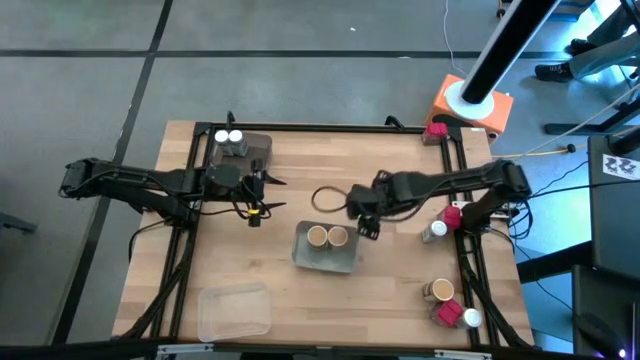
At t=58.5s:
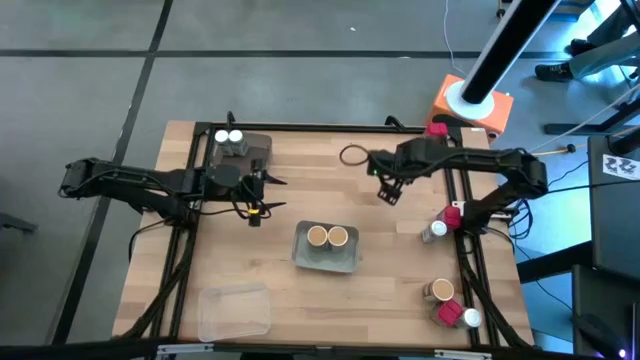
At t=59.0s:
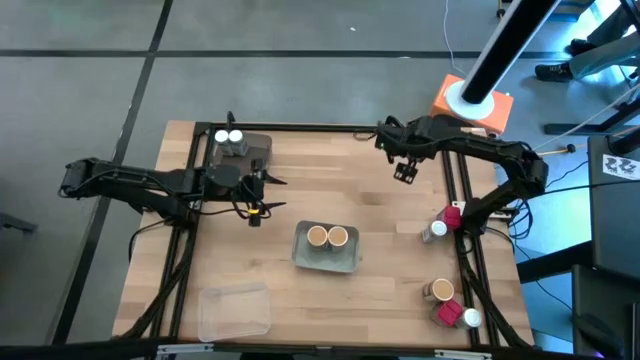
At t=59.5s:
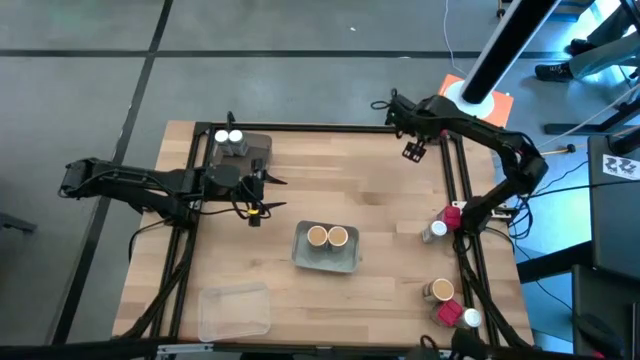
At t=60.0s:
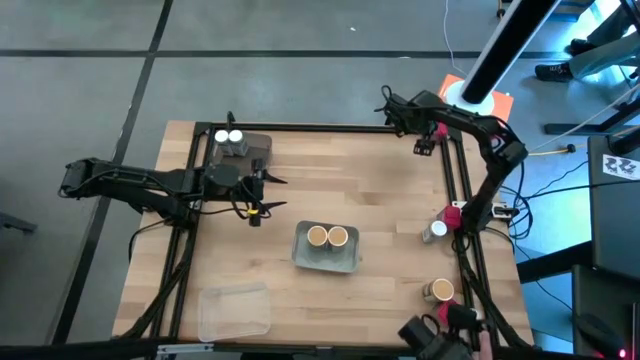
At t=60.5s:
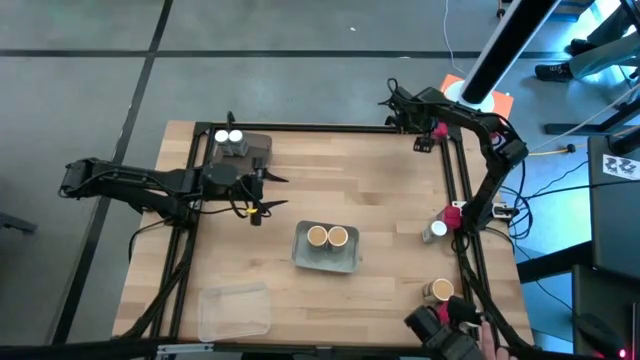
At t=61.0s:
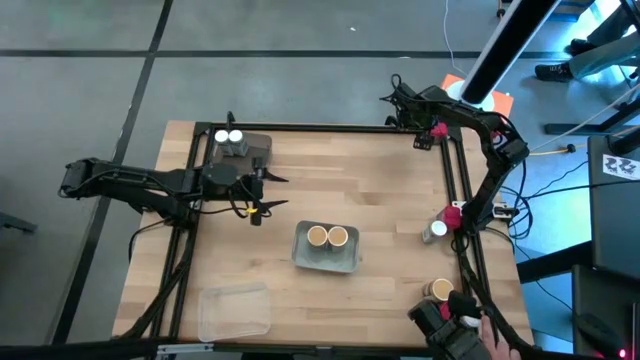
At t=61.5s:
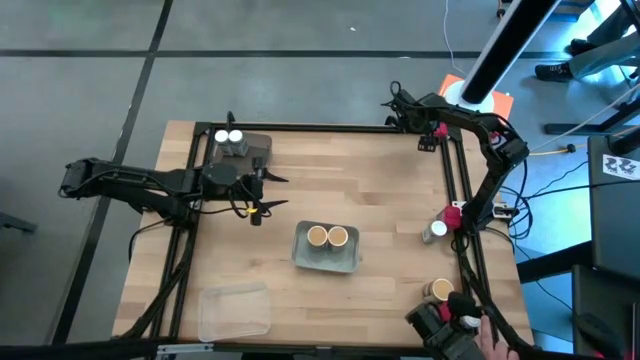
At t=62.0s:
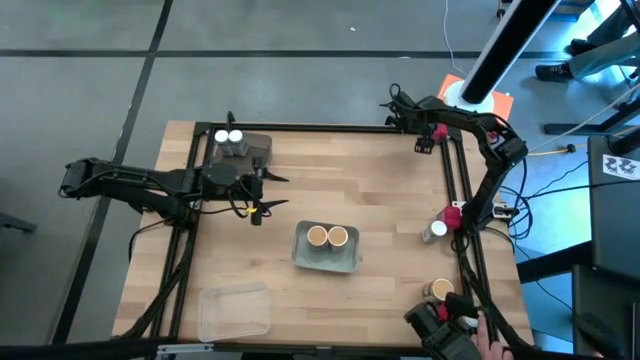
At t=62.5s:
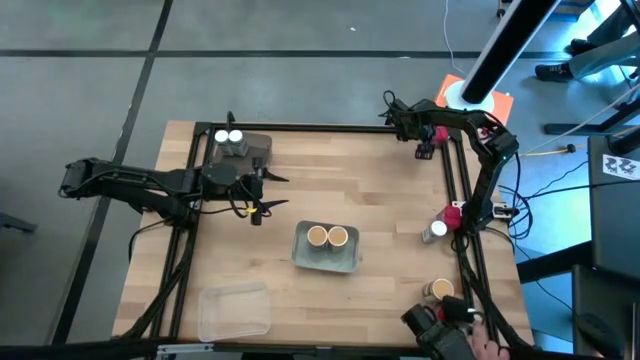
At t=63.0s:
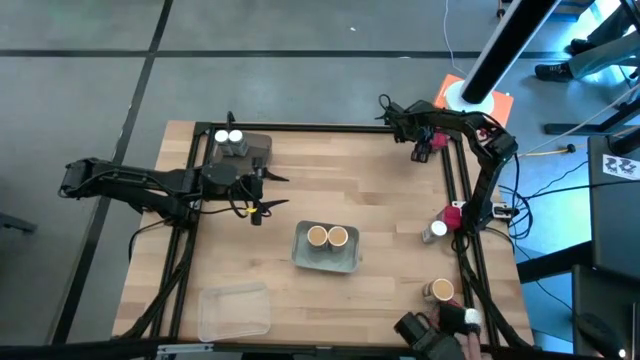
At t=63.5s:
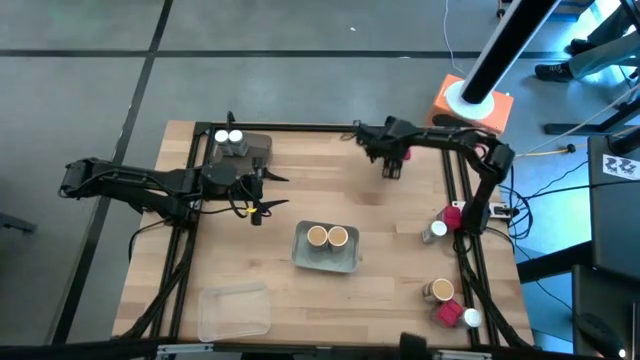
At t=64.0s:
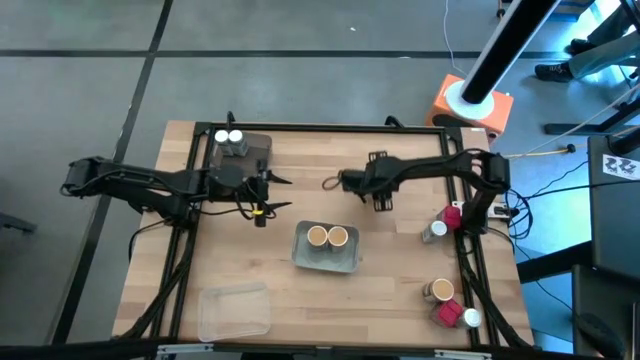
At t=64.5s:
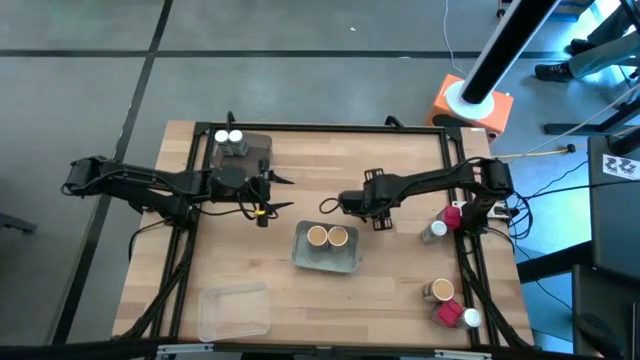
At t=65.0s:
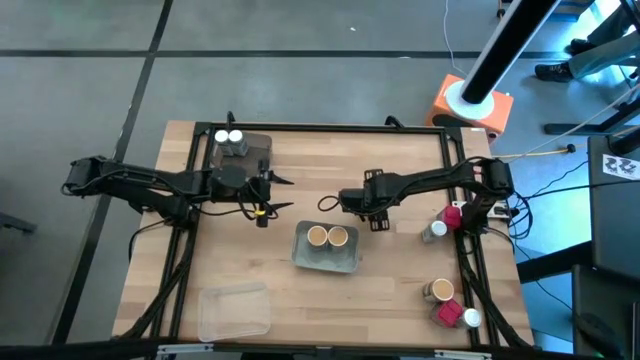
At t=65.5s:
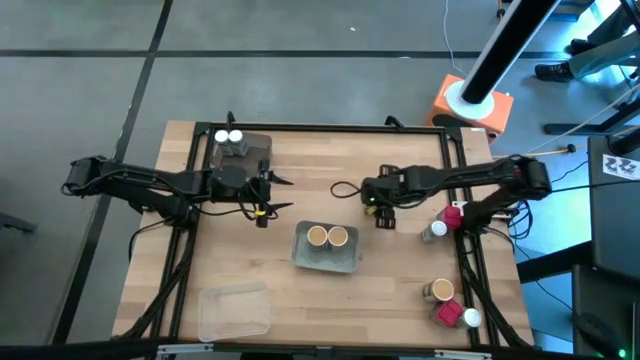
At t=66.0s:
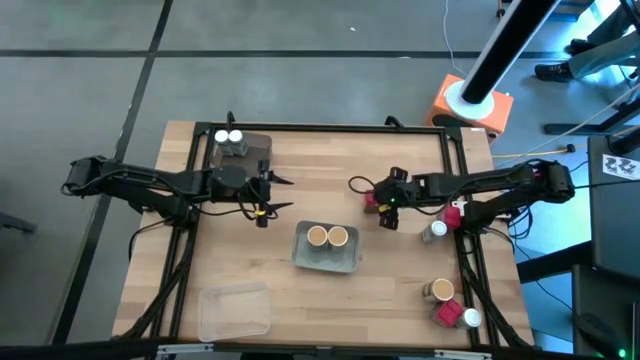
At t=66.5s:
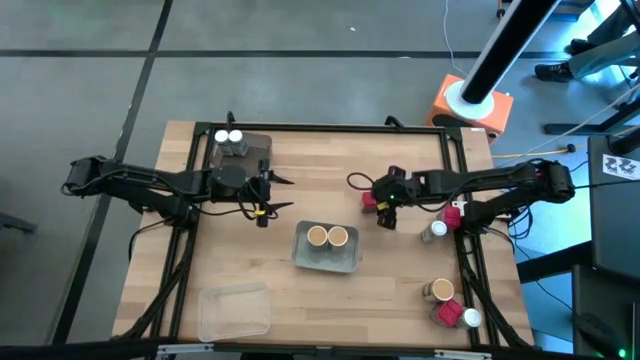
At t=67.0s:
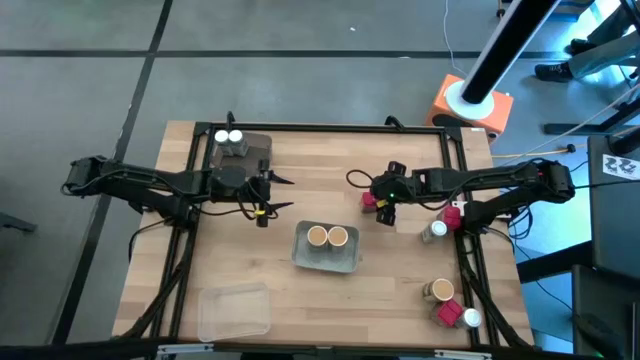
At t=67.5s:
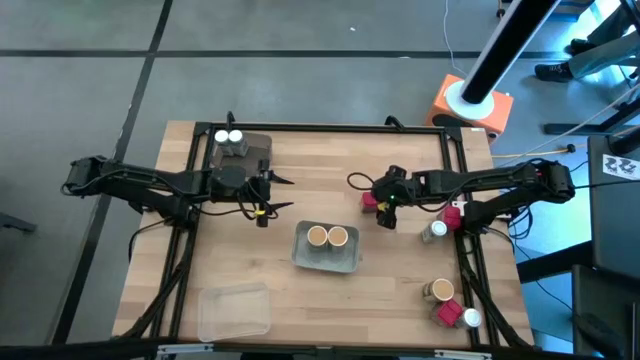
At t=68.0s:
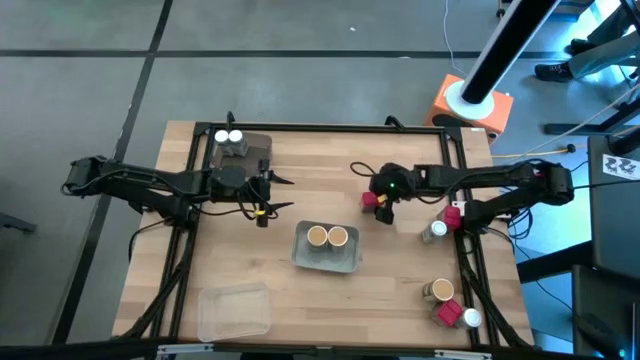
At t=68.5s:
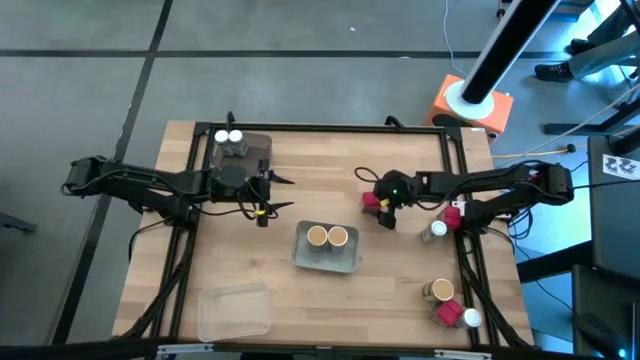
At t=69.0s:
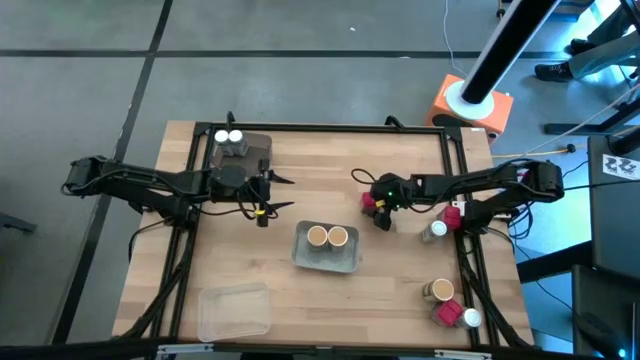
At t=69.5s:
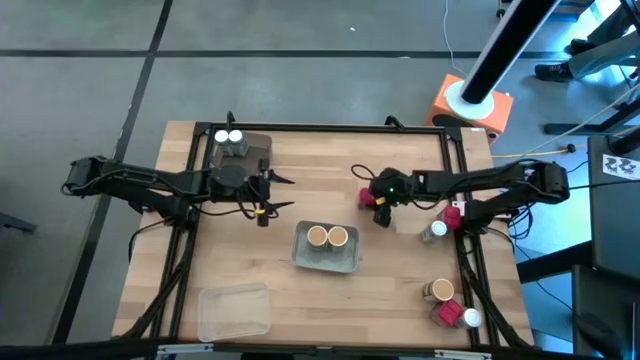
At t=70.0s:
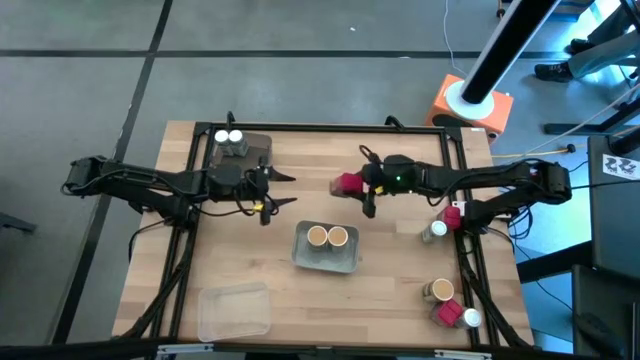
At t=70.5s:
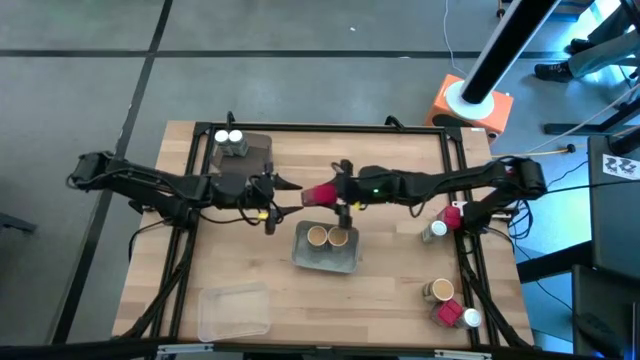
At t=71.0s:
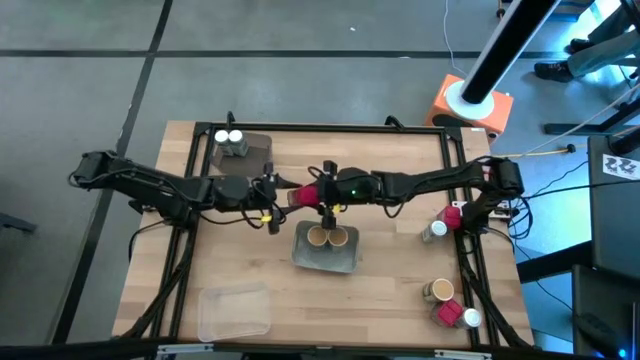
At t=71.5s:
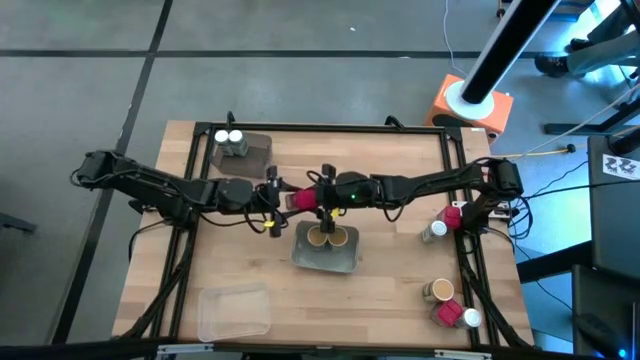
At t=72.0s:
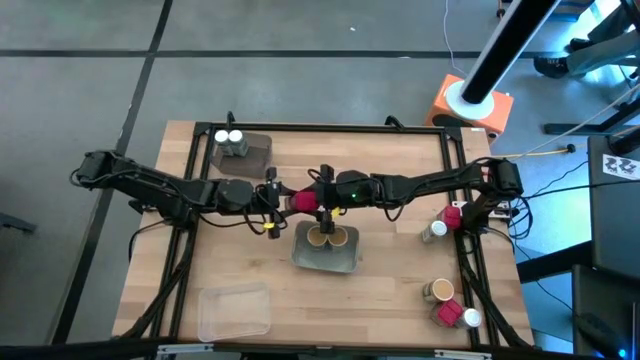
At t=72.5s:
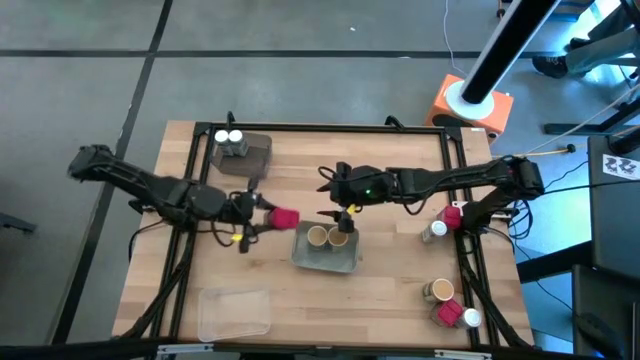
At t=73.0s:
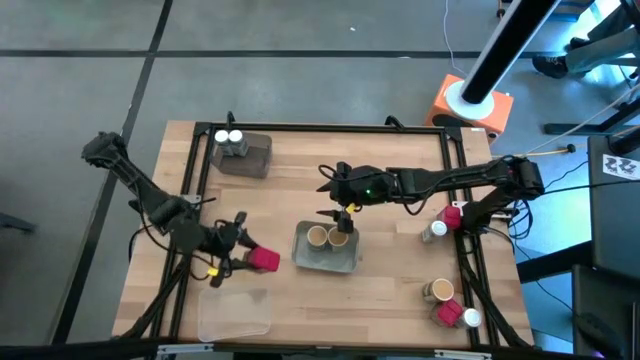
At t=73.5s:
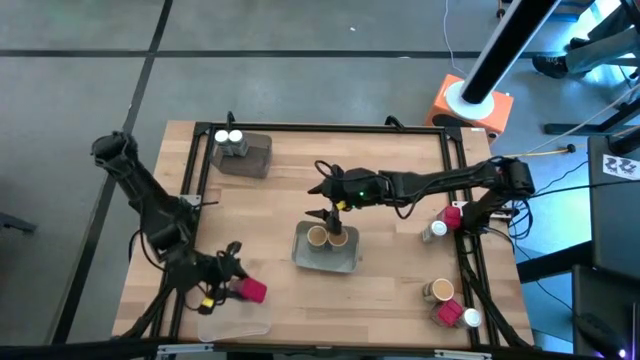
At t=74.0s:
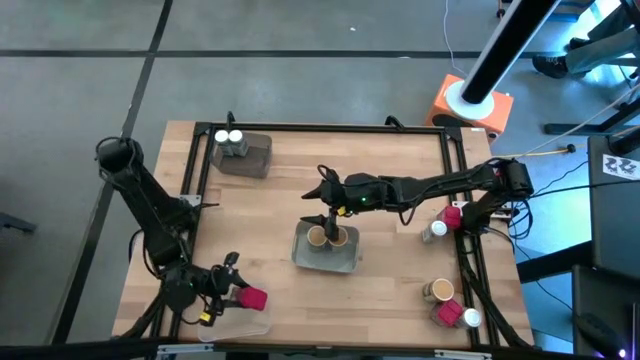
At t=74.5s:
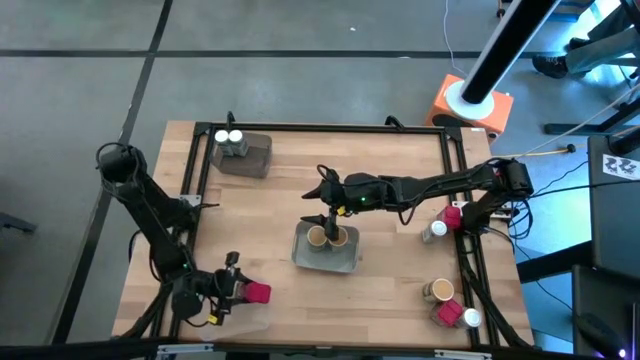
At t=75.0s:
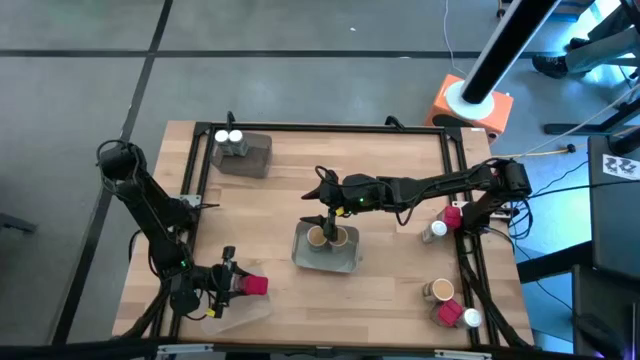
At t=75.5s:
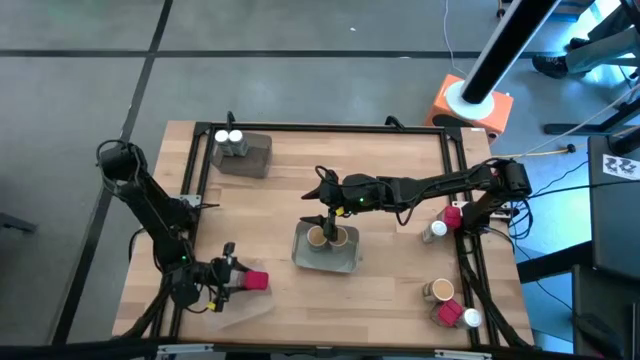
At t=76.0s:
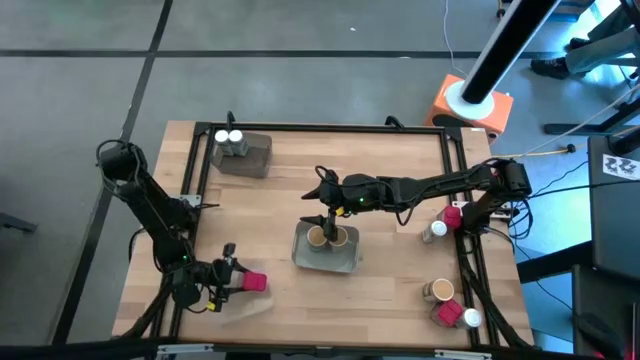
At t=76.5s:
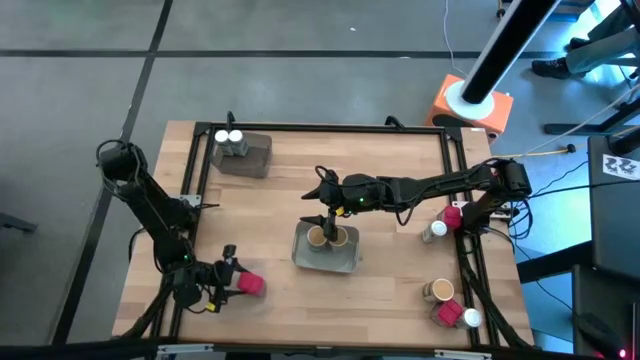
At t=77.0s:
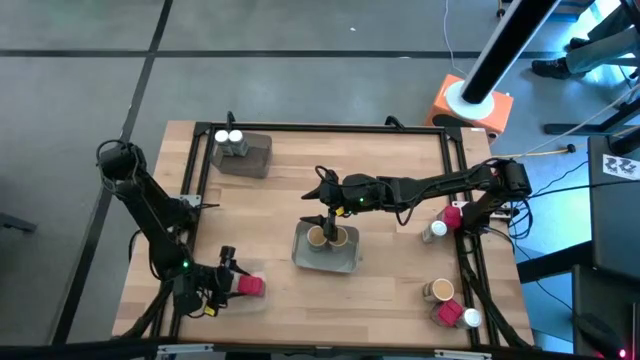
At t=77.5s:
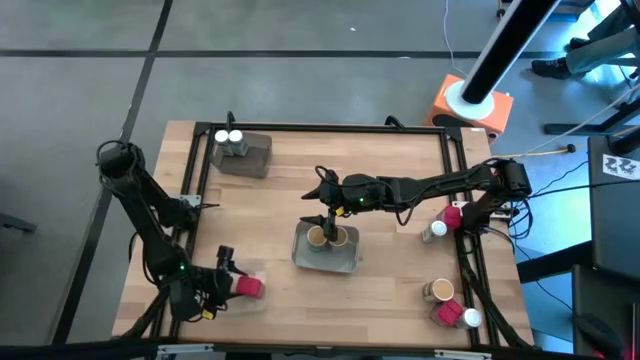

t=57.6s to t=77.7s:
Task: Sort spices by type
Put the top red seasoning can into the white bin

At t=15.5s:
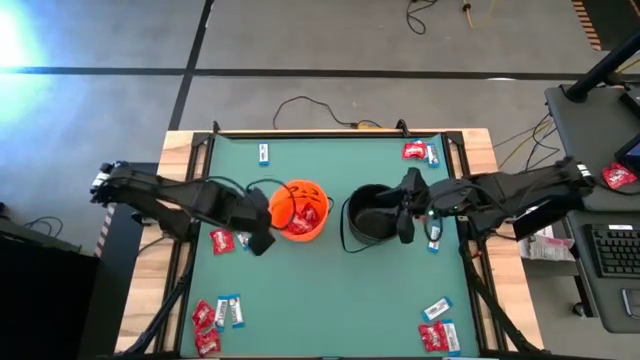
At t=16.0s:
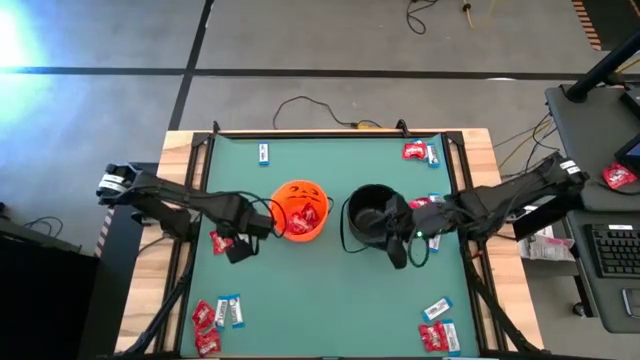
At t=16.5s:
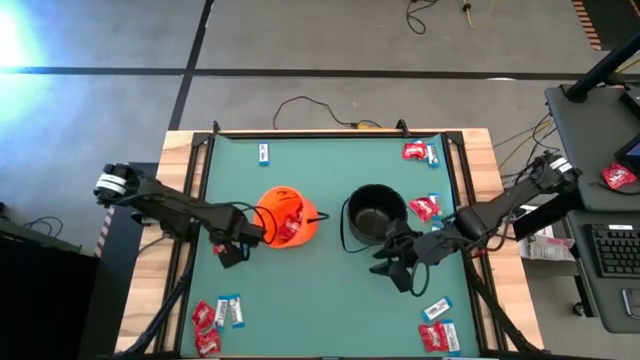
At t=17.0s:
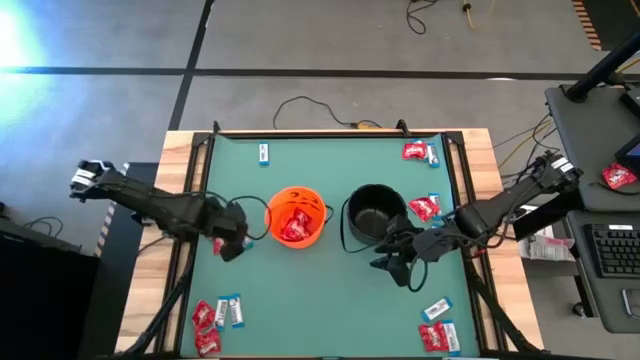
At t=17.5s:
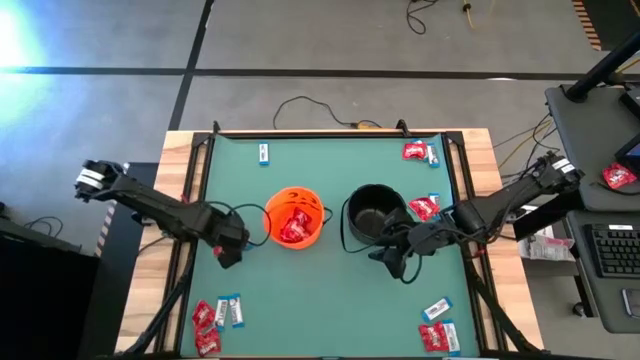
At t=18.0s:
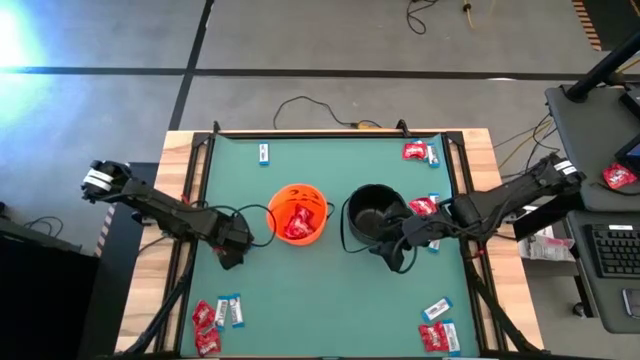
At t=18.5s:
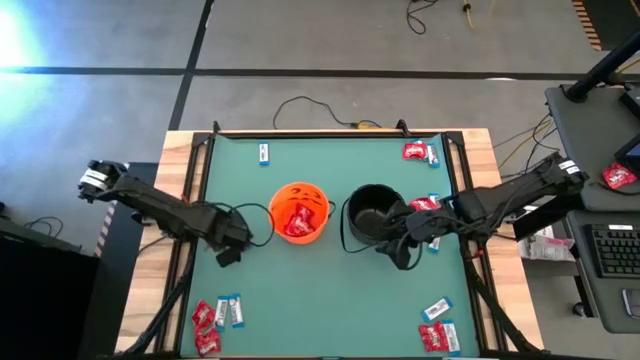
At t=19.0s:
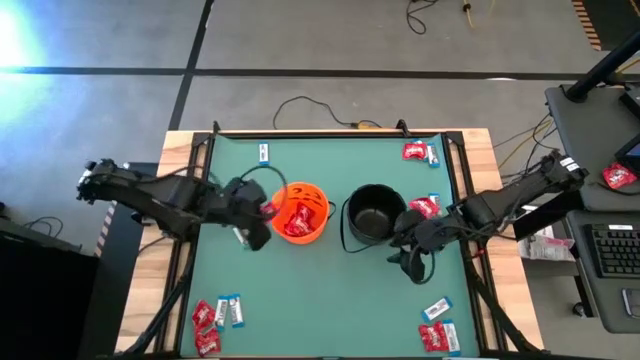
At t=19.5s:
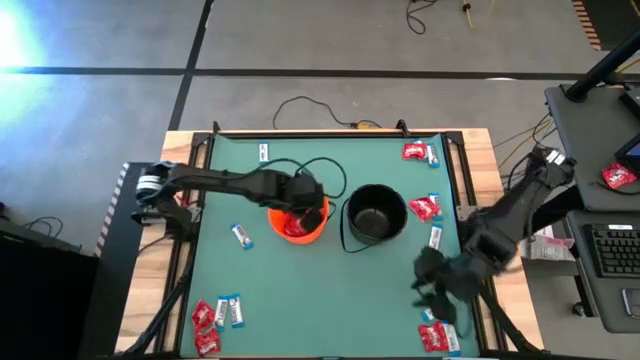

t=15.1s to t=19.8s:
Task: Sort candy by brand, put in halloween buckets
Put the red candy into the orange bucket
